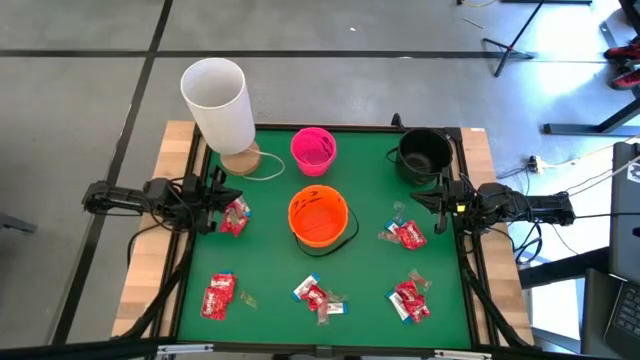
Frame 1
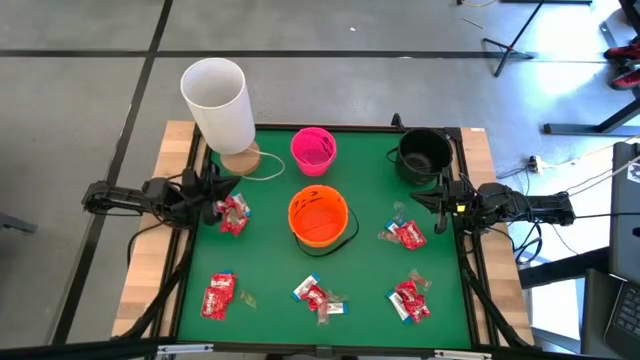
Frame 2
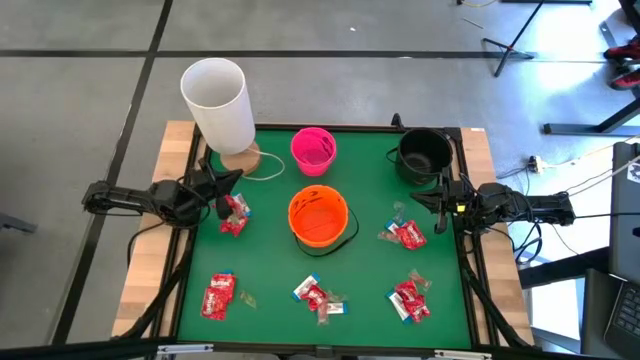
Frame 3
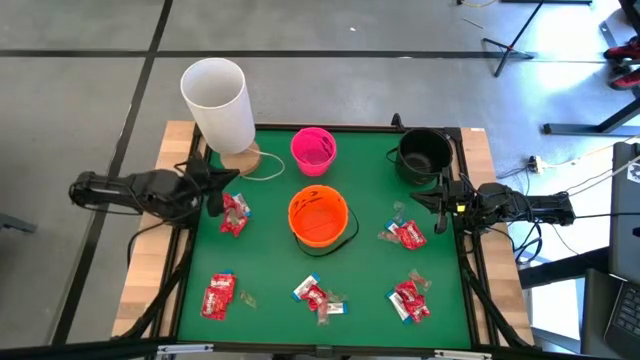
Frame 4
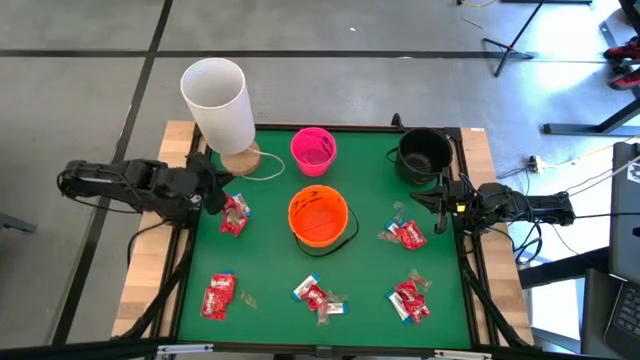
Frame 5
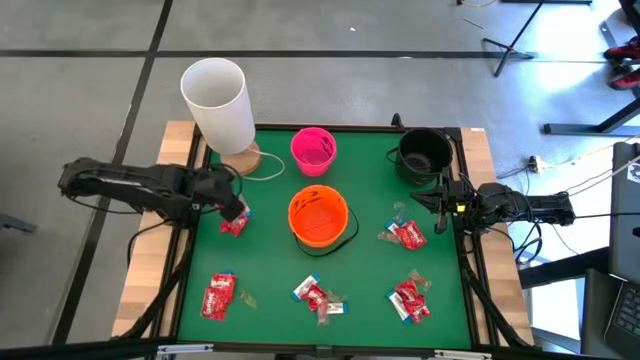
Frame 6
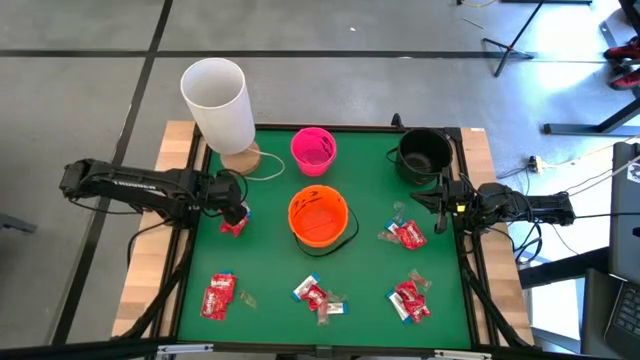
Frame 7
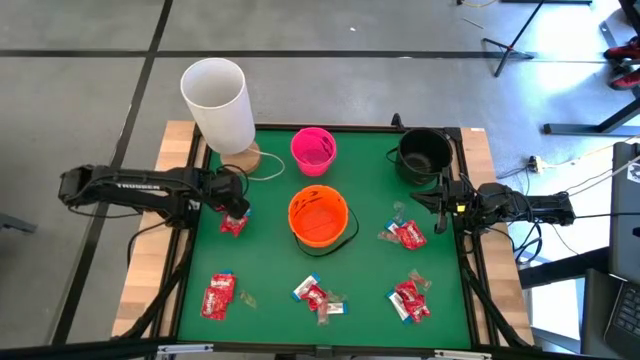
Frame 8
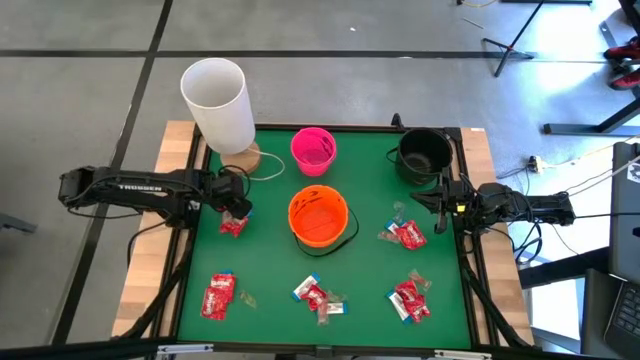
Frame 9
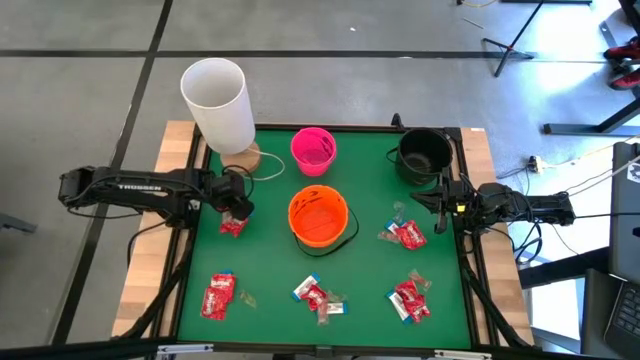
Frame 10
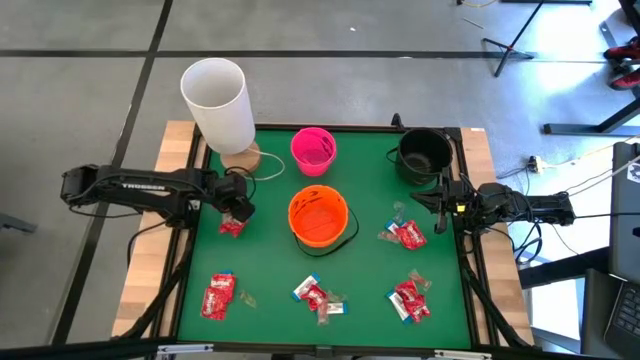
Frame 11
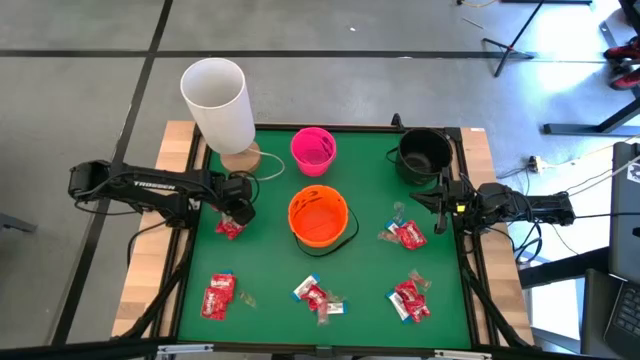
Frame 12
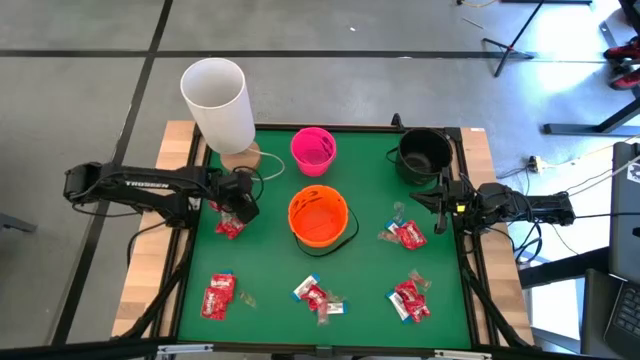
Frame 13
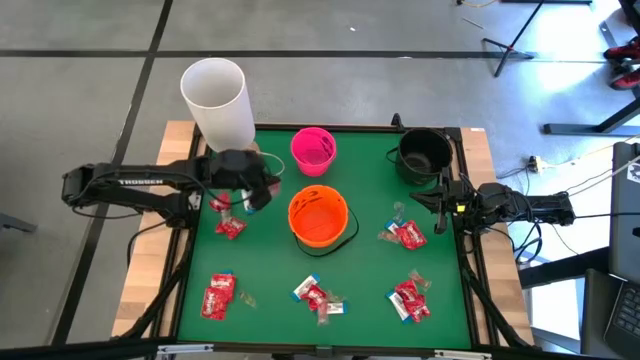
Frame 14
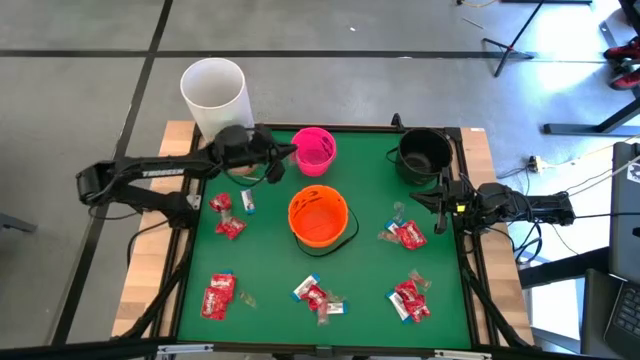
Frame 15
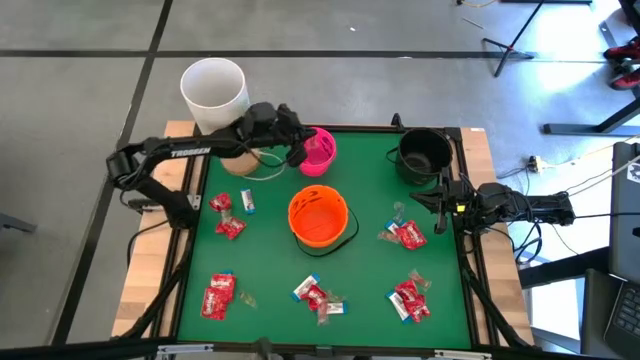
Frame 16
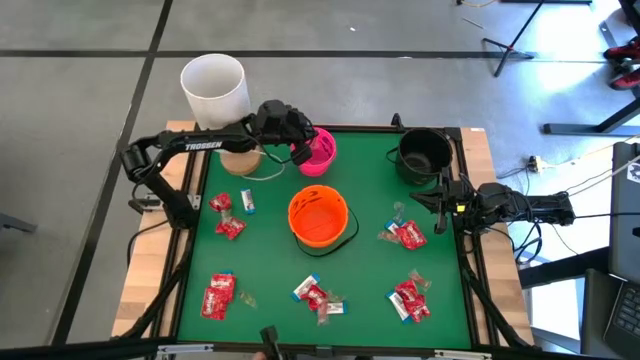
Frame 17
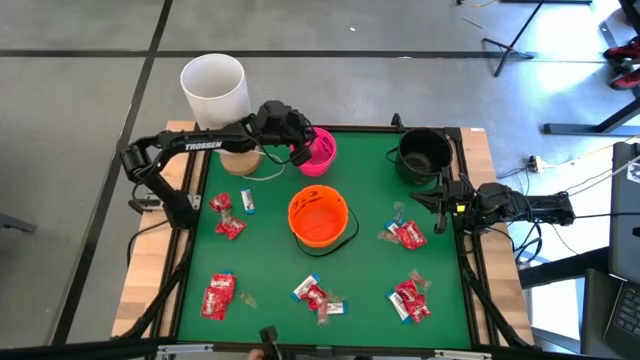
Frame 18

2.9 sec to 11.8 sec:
Task: Sort candy
Put the red candy into the pink bucket

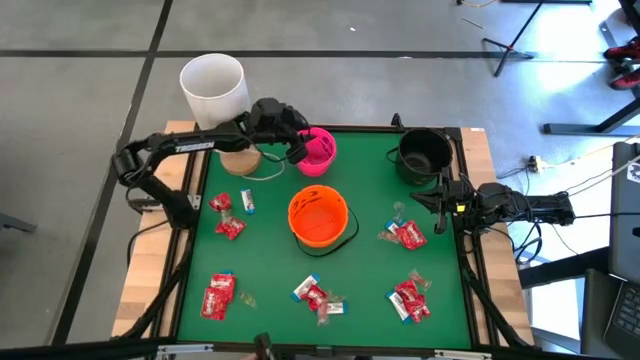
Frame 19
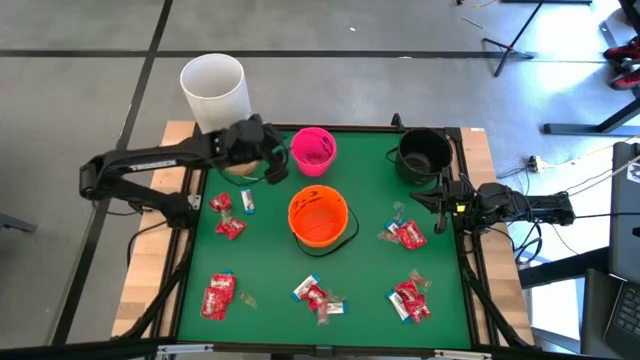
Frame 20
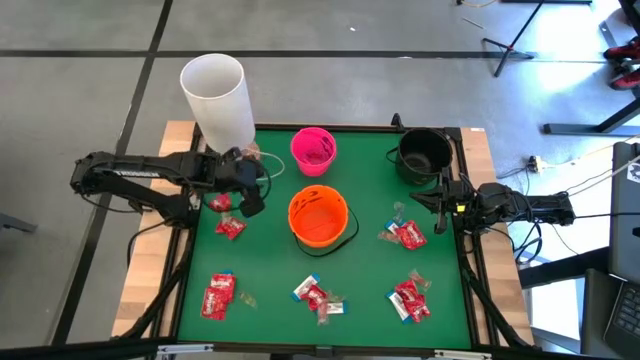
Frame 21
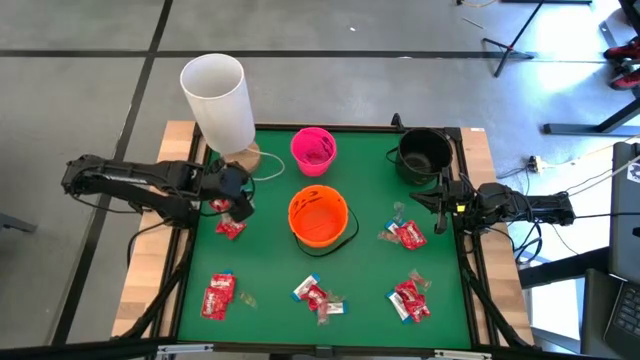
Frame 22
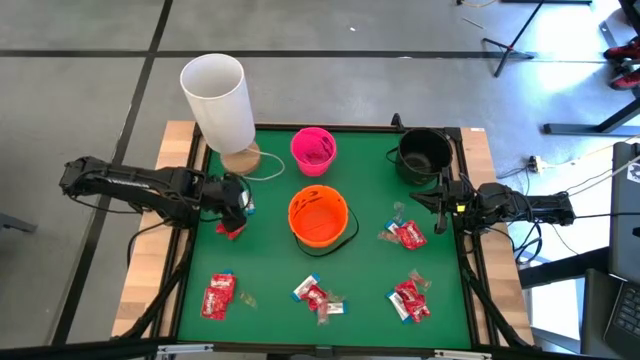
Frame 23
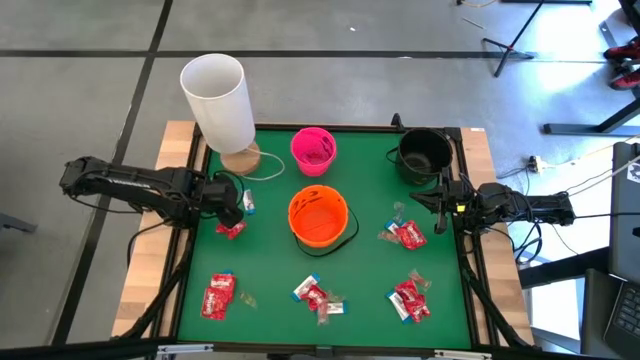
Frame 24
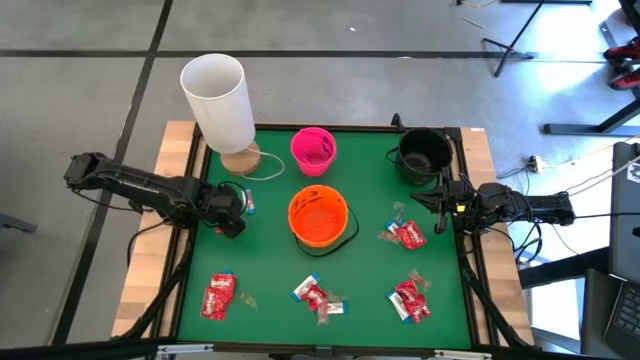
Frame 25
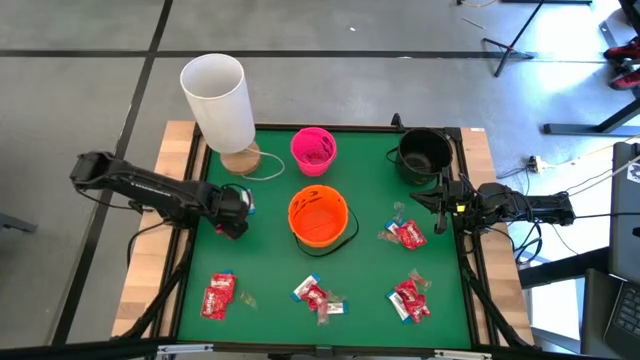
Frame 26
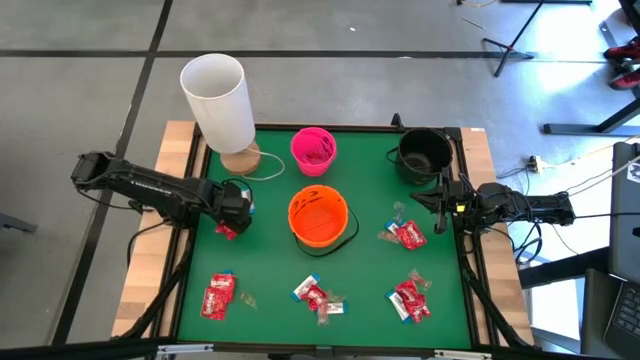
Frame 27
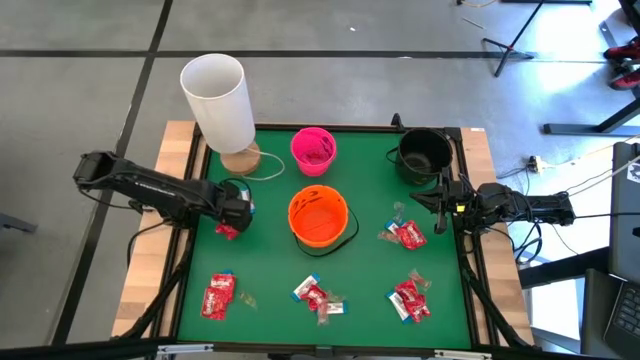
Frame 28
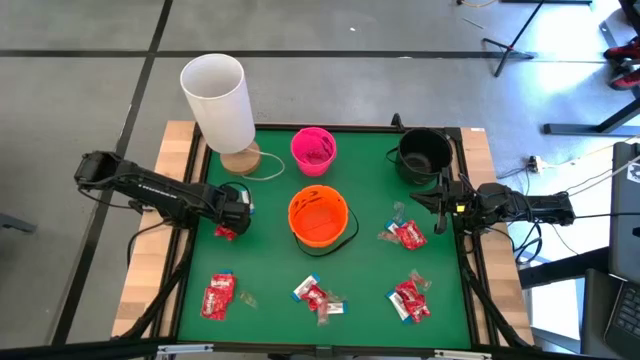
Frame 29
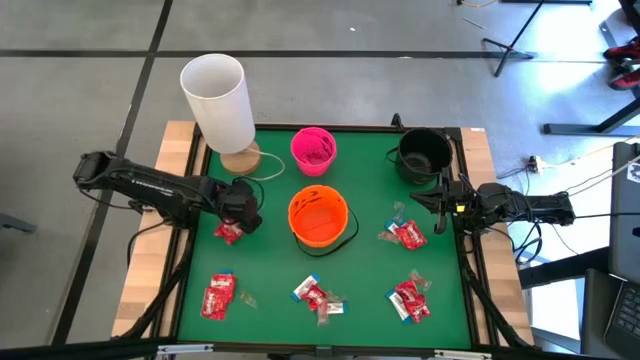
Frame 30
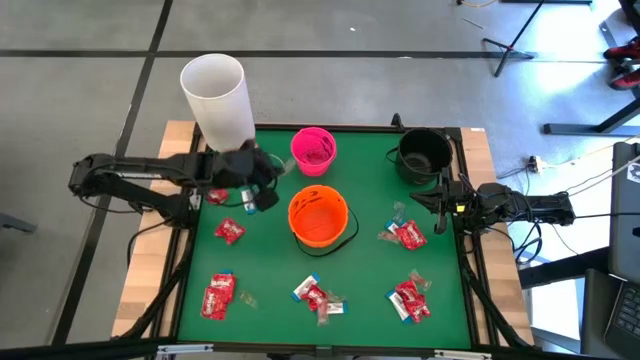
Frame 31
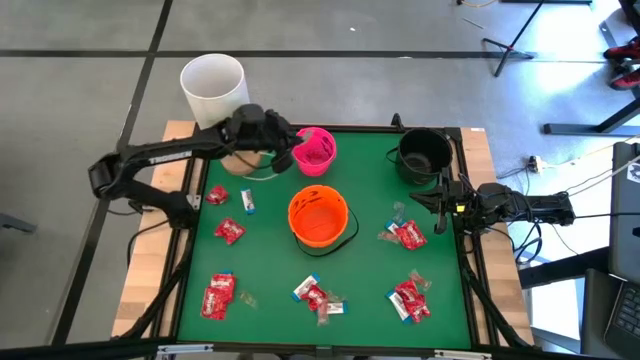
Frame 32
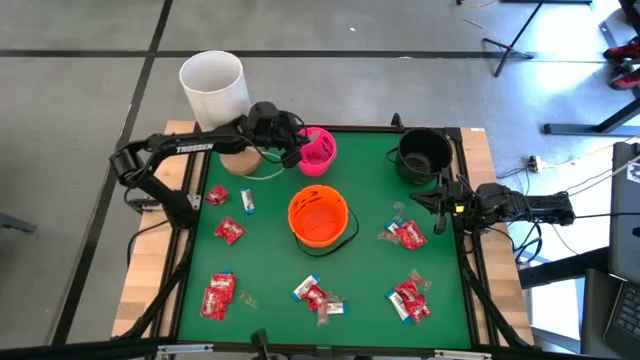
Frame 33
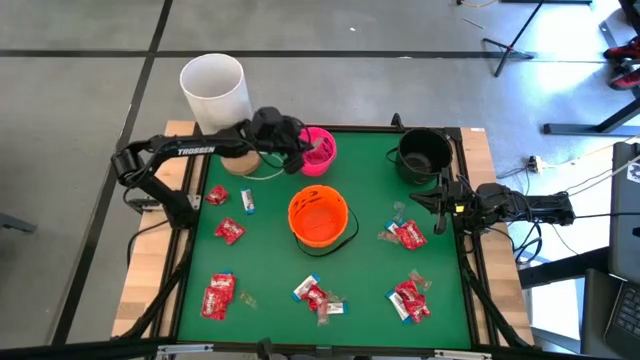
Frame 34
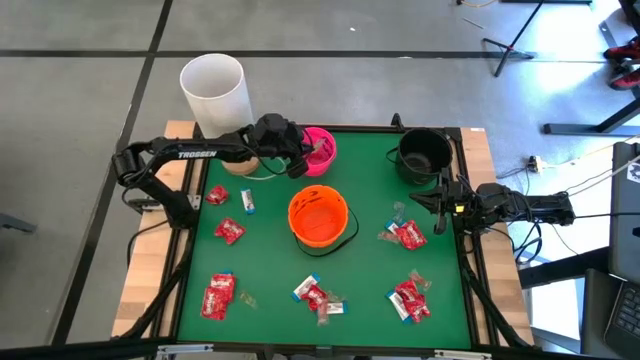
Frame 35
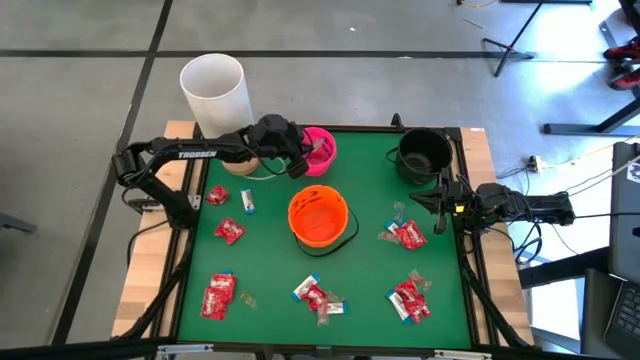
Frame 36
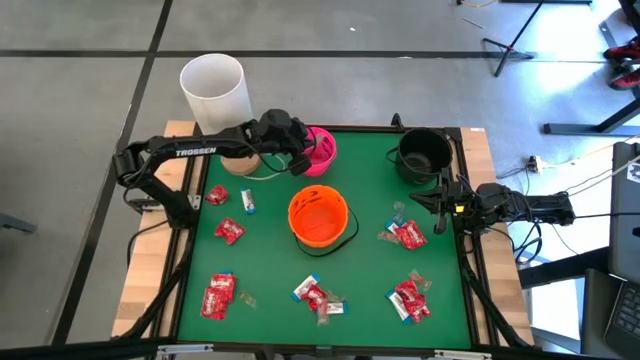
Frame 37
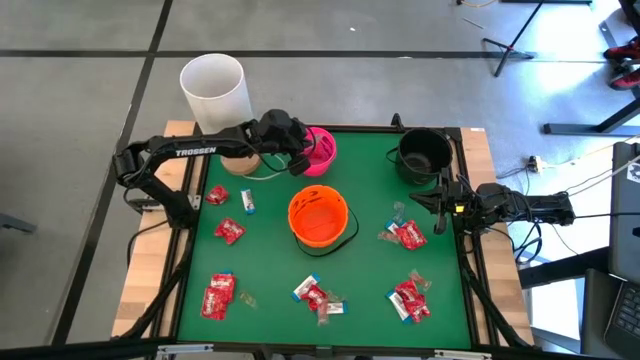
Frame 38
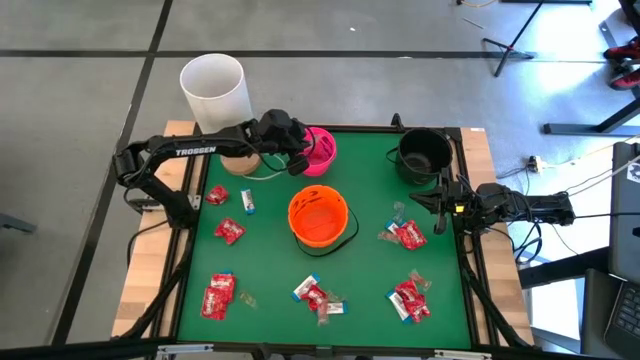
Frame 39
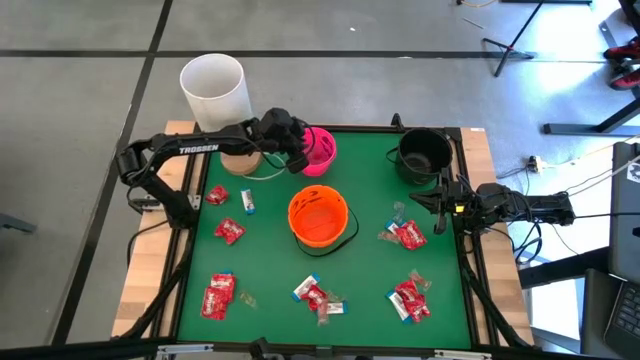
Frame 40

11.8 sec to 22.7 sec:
Put the green candy into the pink bucket

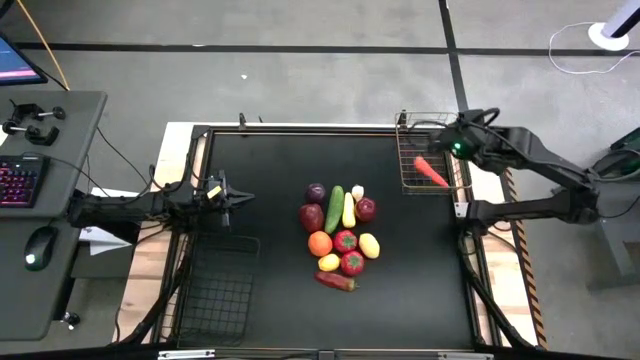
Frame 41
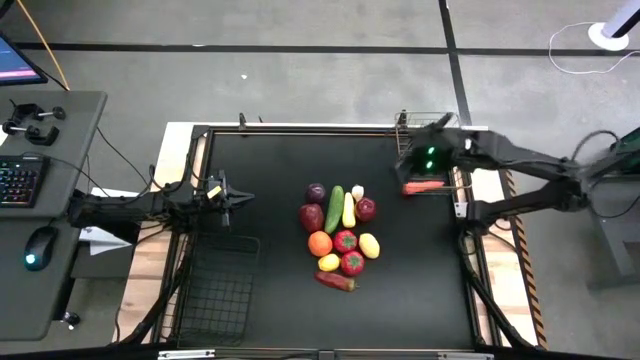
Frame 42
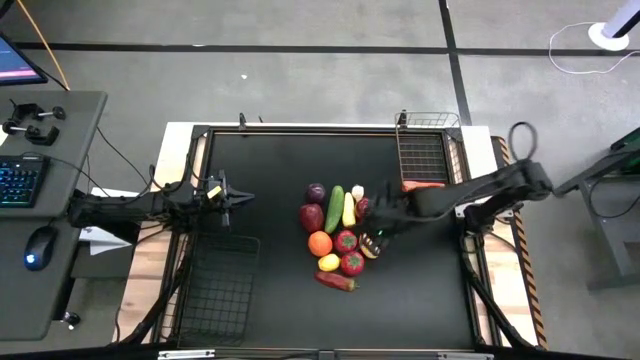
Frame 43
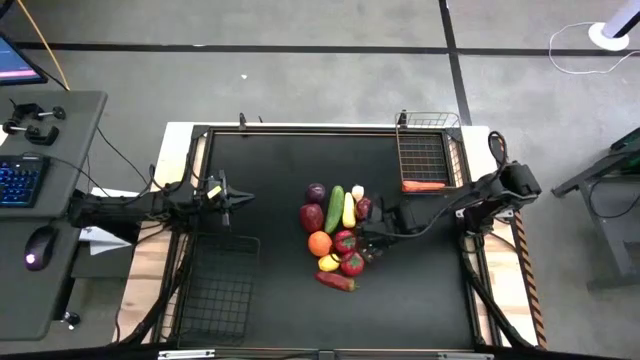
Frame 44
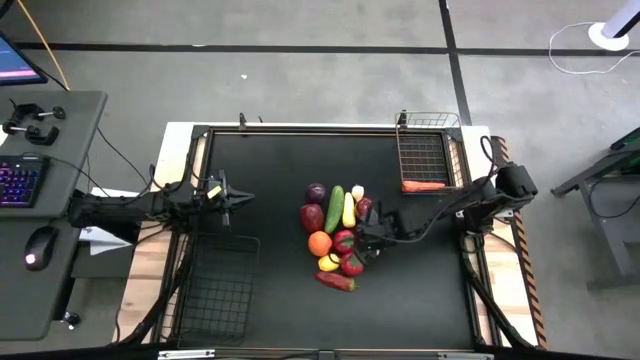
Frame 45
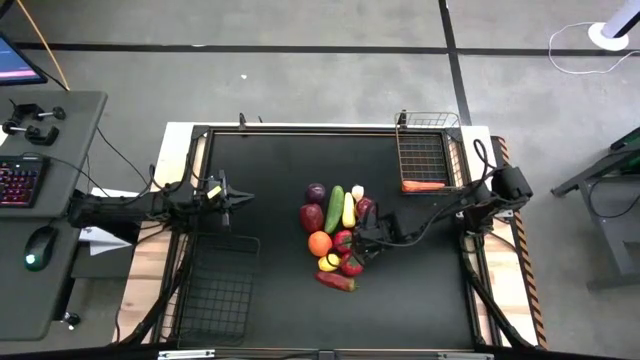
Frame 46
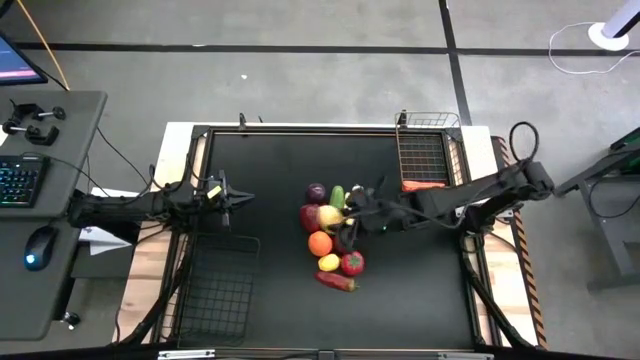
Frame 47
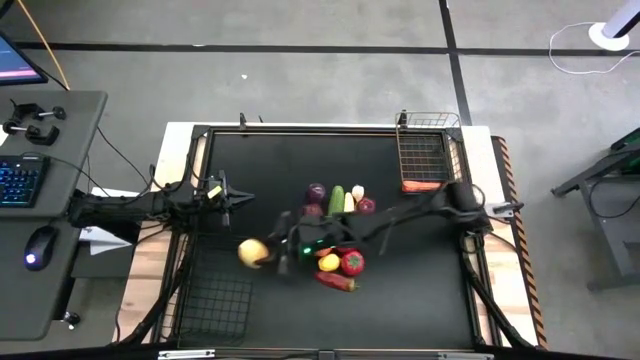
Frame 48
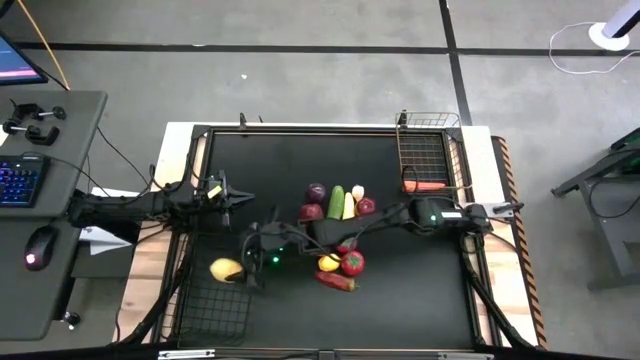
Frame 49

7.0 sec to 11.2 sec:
Task: Sort produce into baskets
Put the right lemon into the left wire basket
